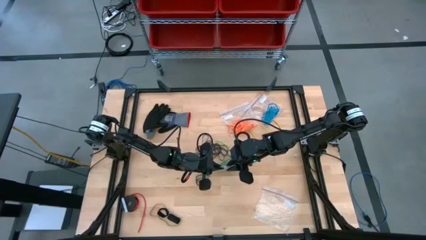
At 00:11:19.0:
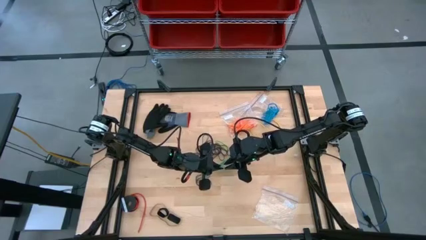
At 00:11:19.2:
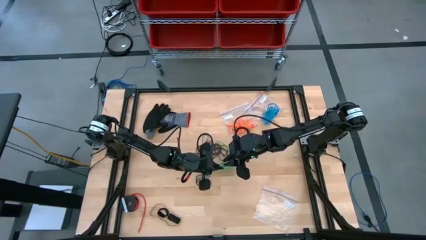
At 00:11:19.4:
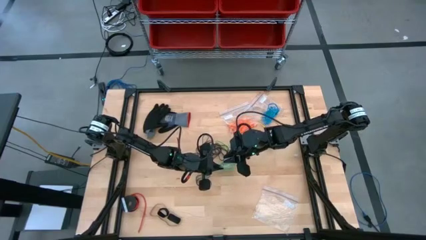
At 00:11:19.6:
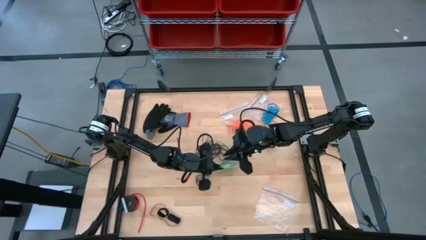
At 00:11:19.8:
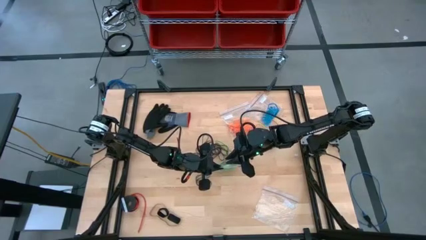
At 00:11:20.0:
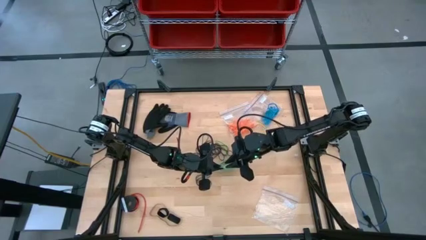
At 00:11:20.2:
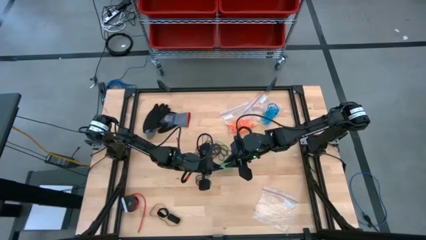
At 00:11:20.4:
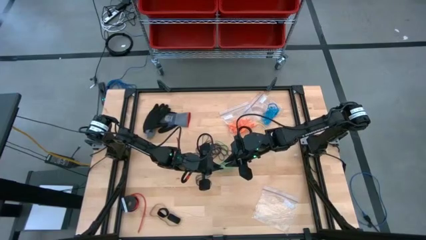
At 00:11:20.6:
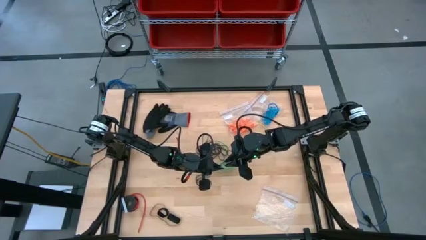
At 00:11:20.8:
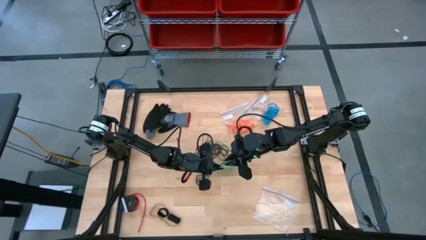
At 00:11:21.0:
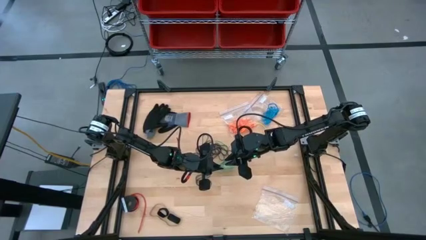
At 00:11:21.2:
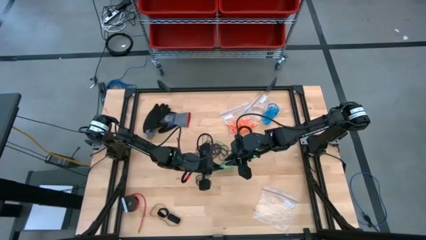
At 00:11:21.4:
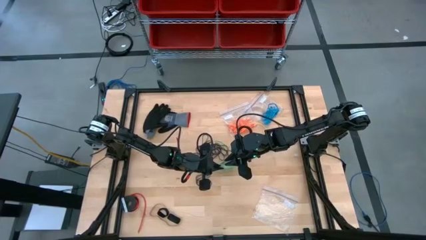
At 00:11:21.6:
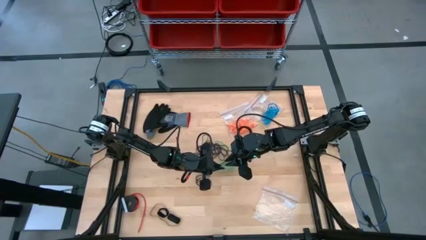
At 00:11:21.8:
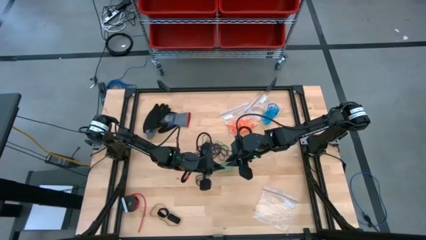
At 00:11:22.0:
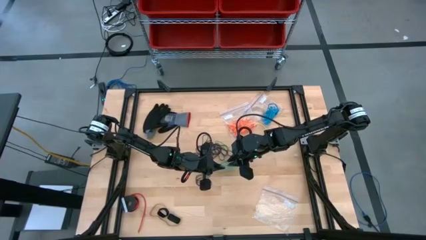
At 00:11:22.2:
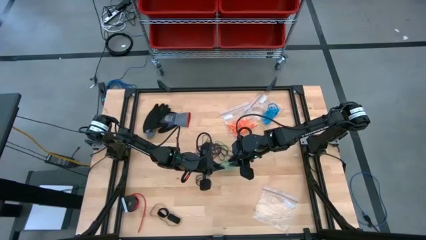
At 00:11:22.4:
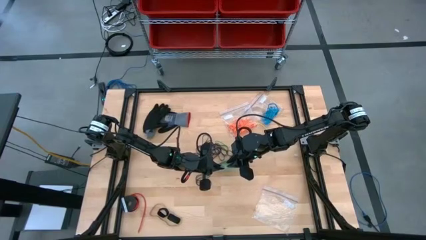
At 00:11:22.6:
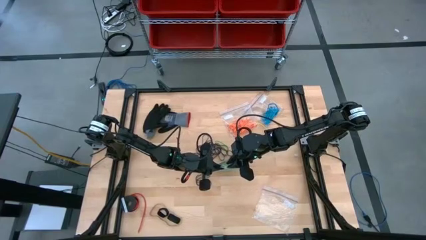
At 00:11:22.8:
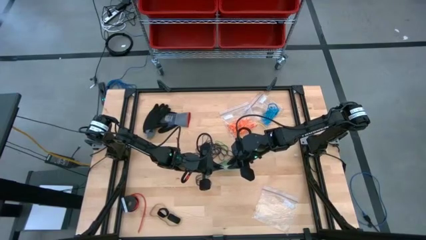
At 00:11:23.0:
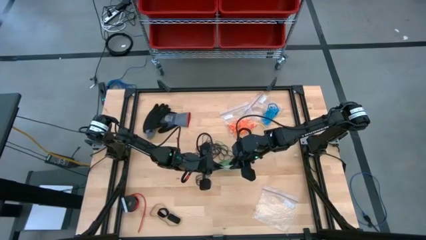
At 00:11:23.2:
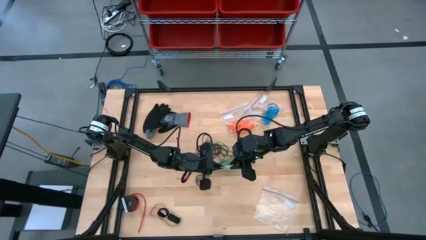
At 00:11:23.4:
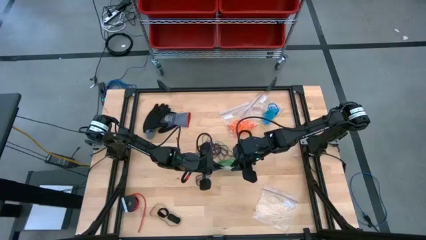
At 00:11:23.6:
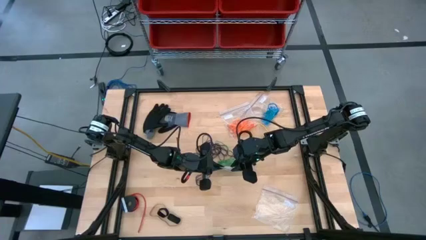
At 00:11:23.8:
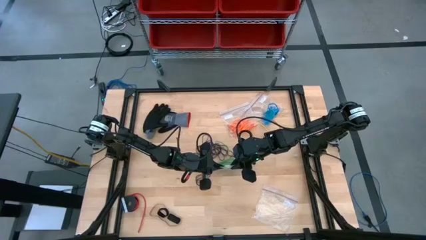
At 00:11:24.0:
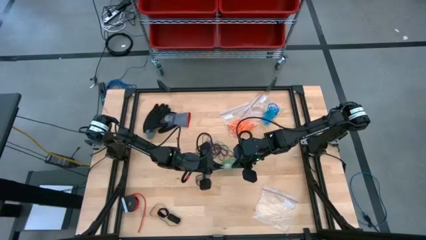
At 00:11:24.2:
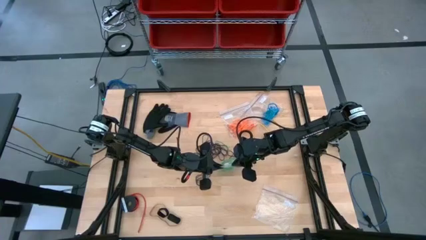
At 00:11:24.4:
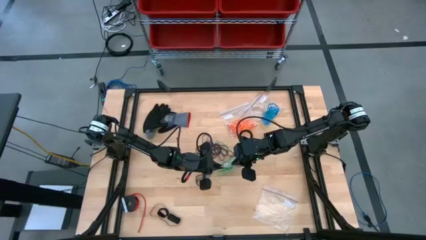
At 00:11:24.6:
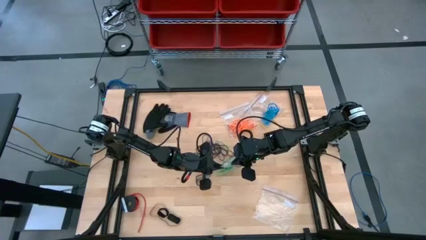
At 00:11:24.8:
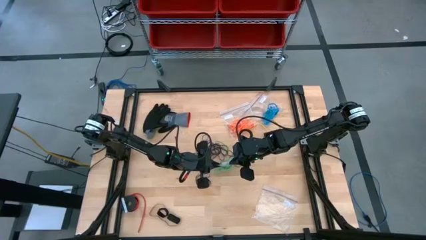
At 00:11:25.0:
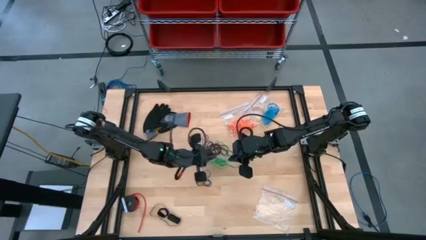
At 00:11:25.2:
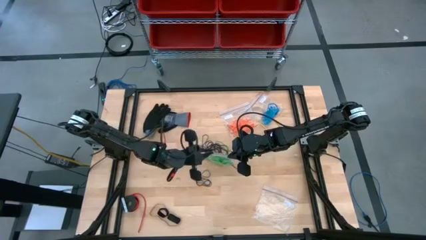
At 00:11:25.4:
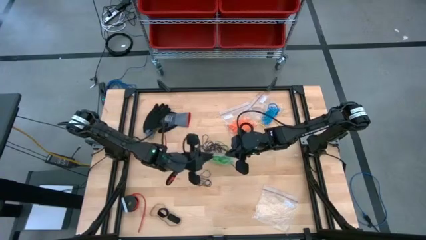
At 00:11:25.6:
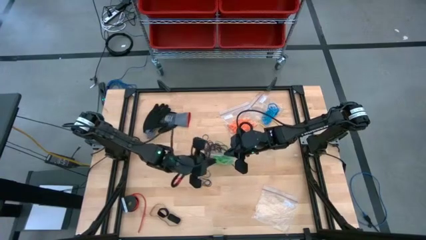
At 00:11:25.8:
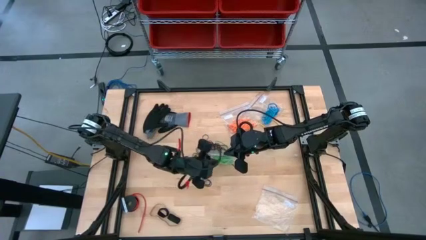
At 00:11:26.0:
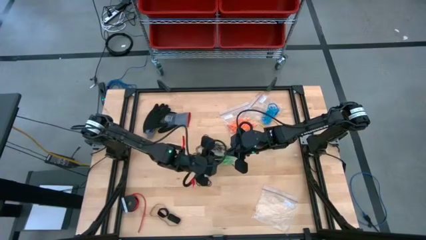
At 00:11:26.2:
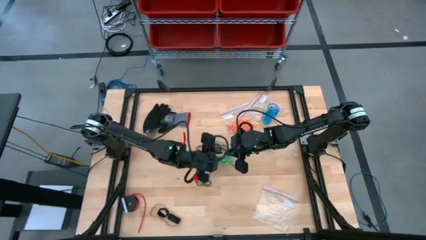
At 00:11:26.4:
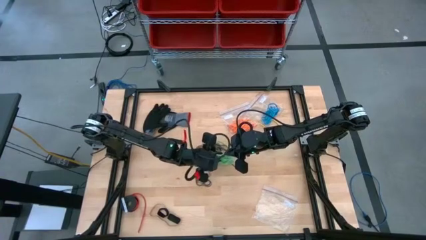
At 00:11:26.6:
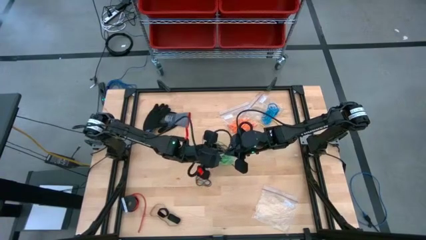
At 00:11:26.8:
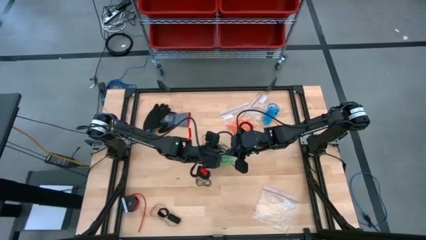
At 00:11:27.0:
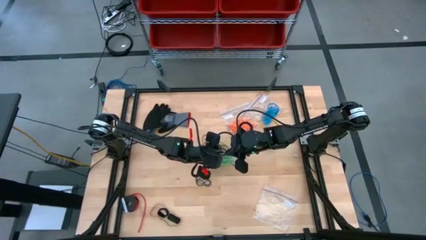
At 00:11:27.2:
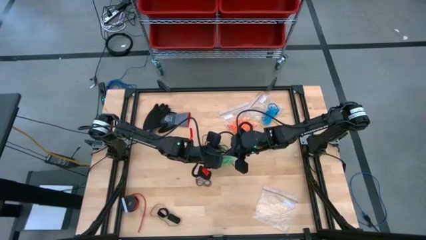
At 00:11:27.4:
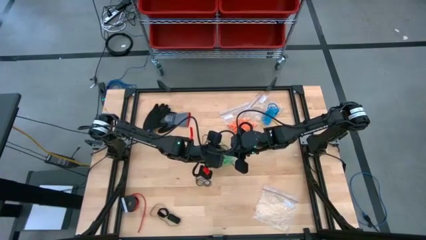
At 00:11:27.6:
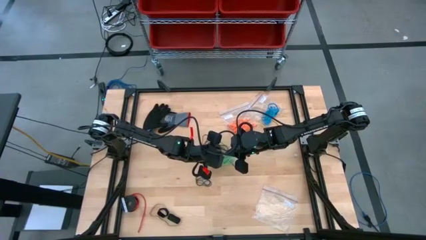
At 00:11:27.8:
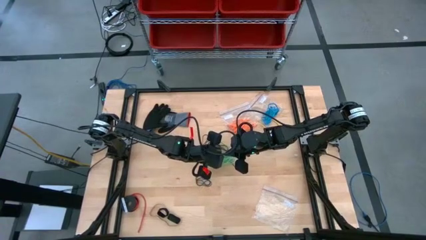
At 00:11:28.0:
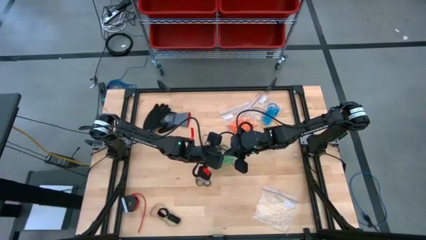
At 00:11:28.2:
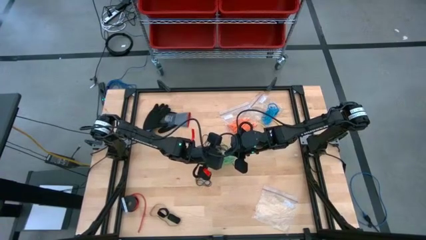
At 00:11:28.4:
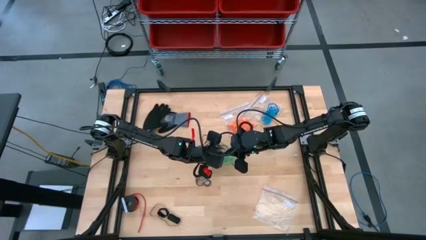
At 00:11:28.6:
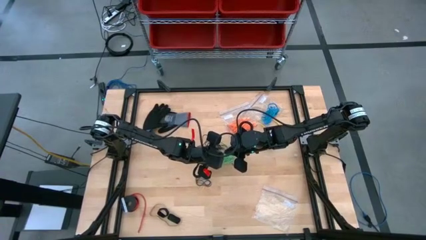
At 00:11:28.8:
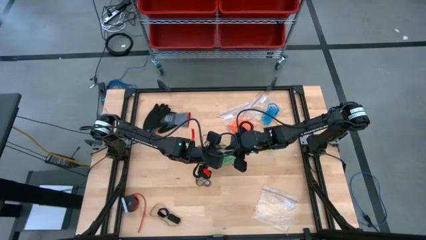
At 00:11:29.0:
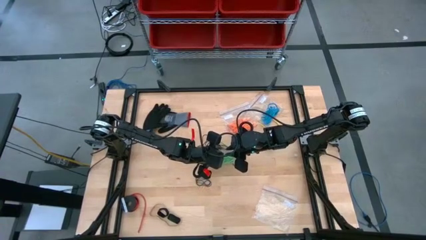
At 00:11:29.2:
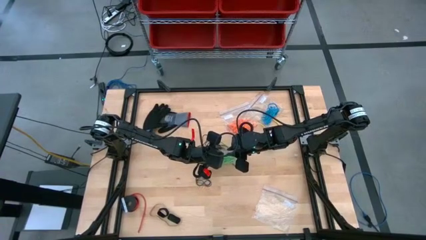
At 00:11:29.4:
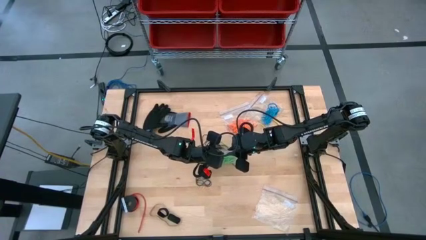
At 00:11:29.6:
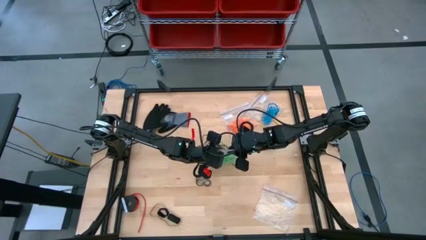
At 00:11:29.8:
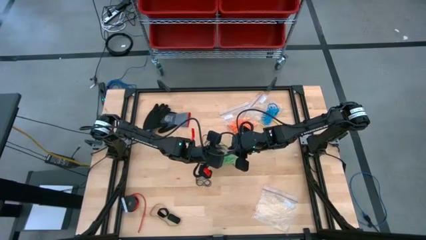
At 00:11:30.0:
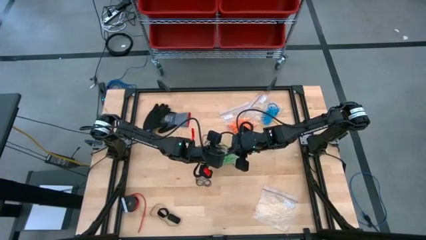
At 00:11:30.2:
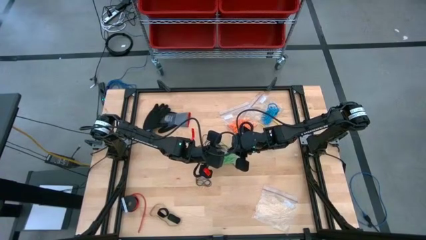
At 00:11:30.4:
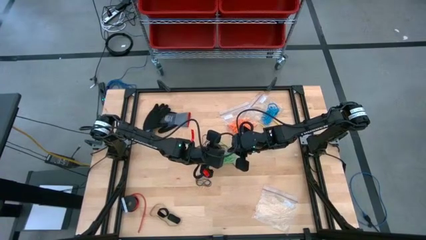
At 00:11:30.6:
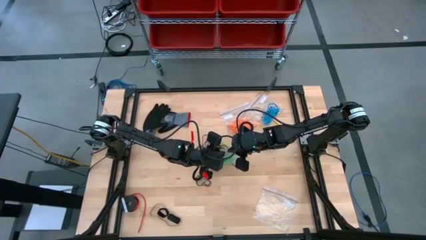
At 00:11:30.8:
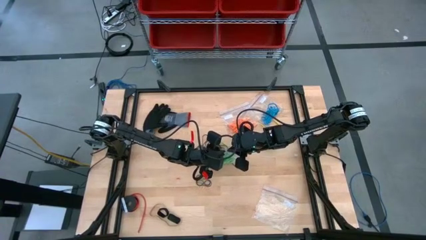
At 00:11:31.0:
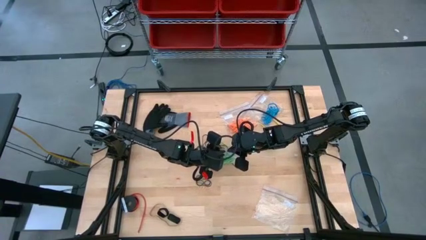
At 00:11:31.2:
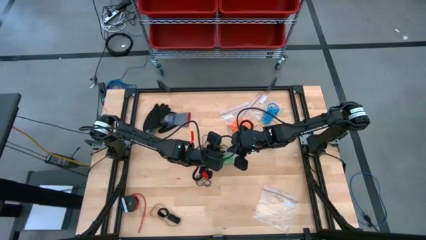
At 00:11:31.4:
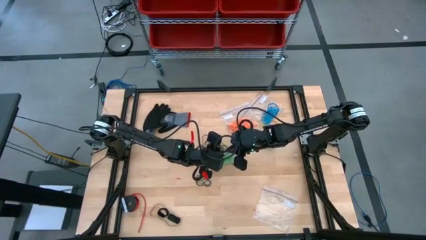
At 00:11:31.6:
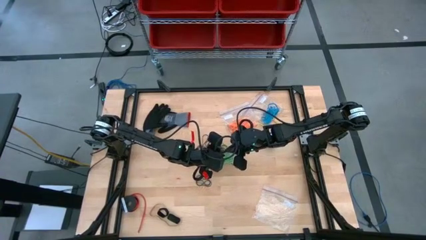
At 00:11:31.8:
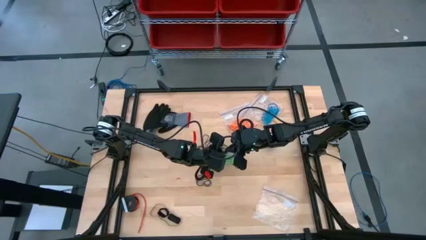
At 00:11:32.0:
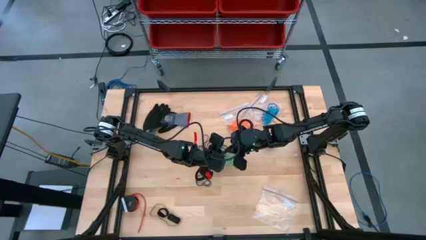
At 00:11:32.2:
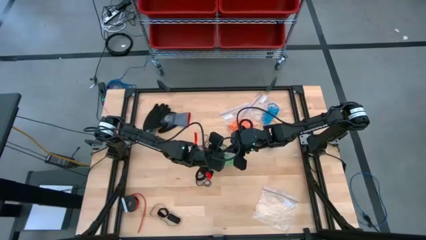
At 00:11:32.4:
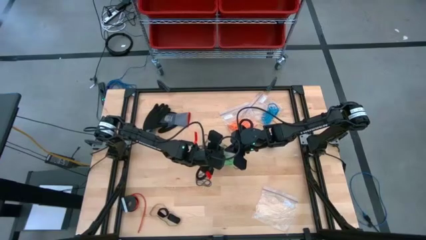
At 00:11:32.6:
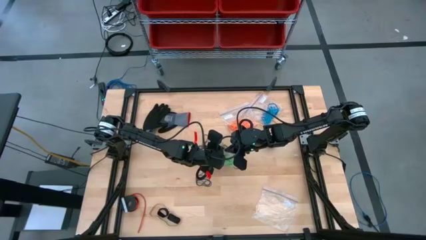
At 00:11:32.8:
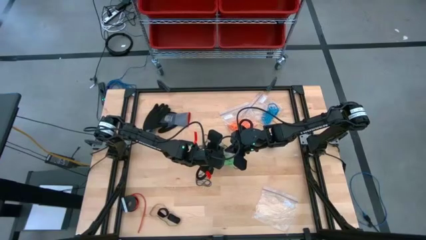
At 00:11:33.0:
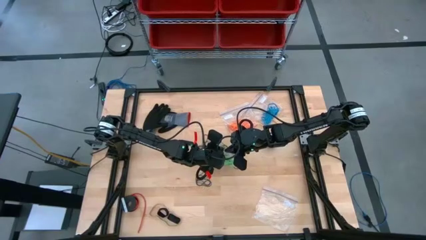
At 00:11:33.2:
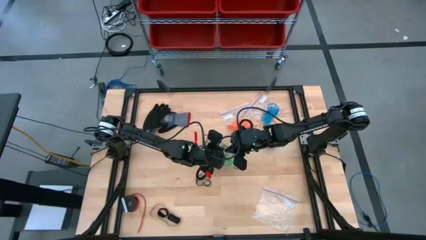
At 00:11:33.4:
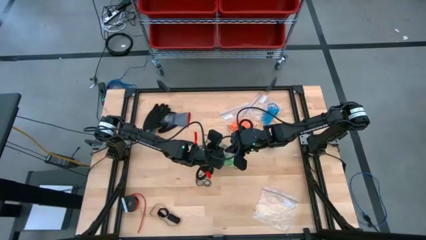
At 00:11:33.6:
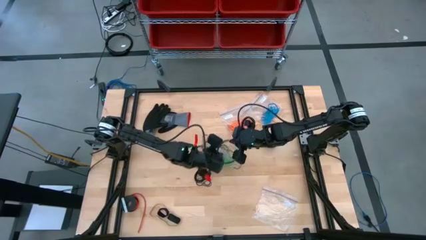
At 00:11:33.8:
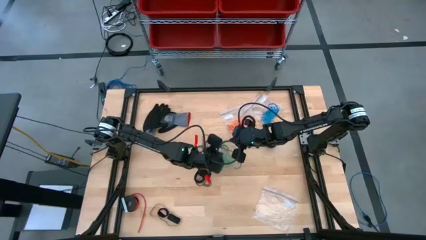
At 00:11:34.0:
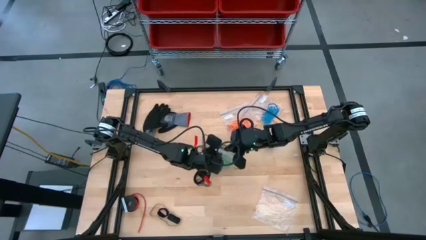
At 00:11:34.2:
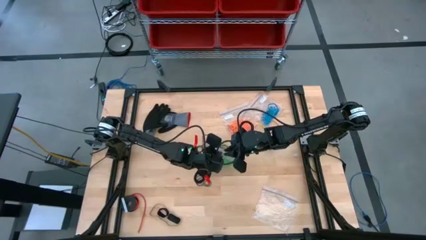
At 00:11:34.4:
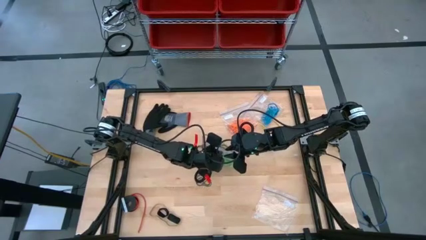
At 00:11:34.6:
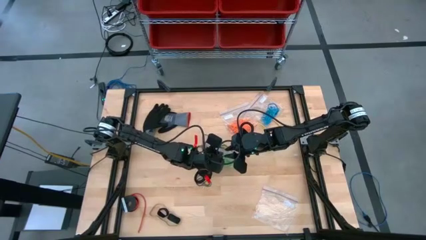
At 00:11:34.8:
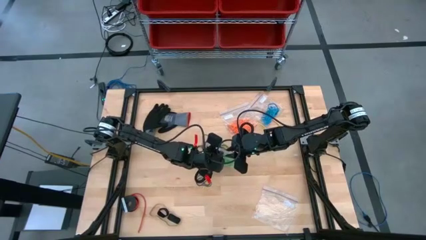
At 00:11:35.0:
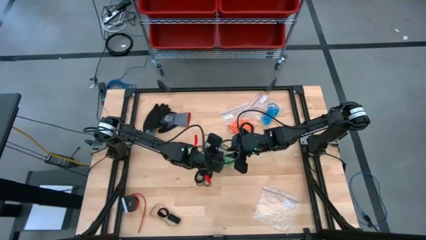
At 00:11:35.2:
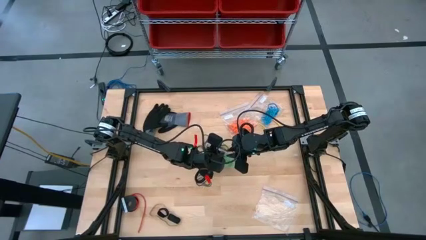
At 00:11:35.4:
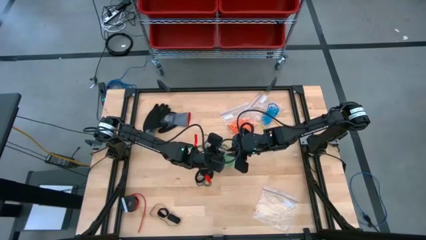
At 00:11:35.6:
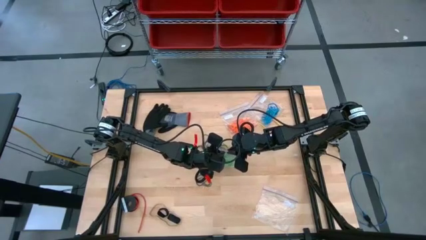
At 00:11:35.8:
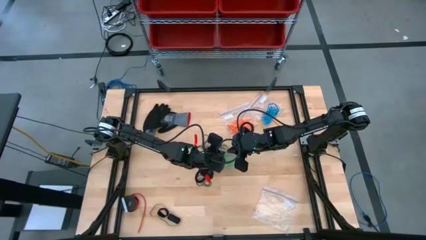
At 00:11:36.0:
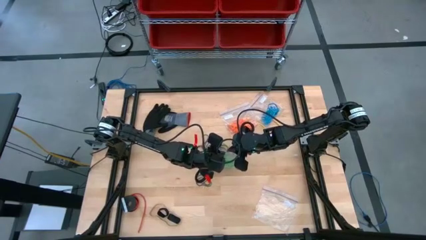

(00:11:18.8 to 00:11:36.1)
Task: Sort rubber bands
Open the transparent zip bag
